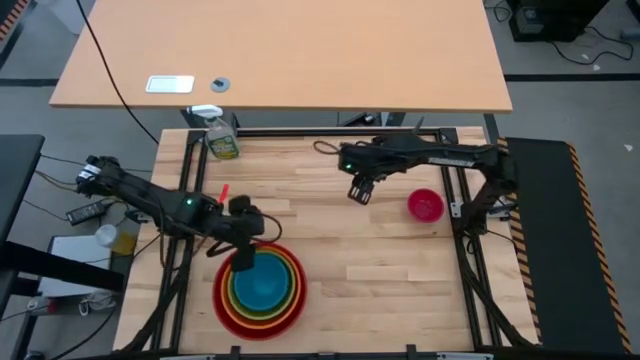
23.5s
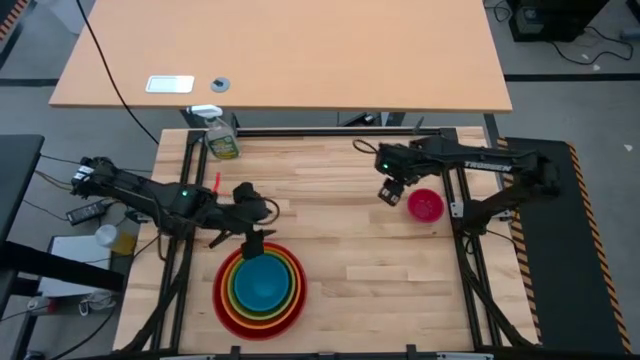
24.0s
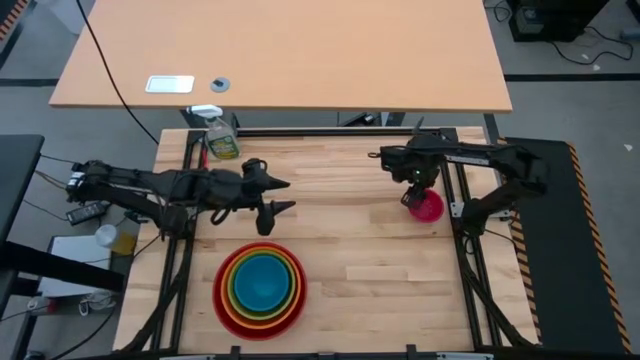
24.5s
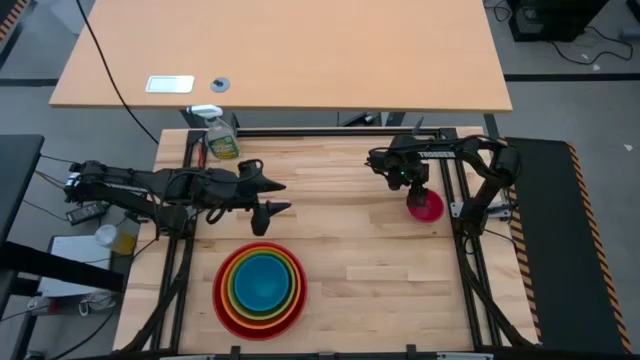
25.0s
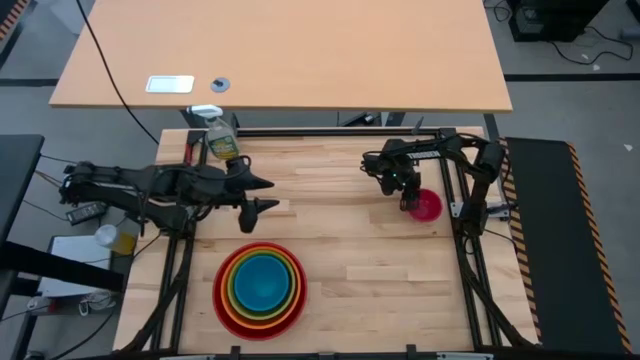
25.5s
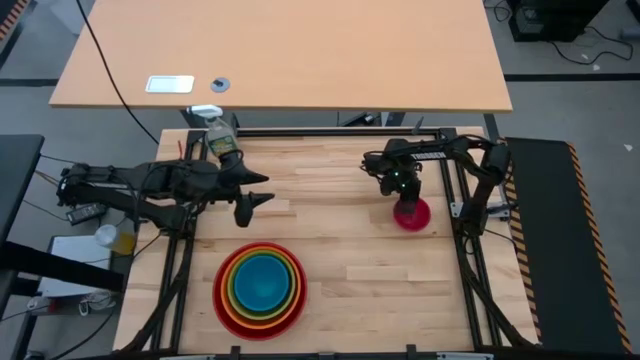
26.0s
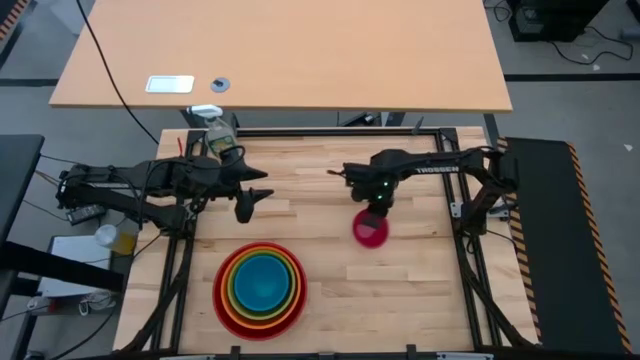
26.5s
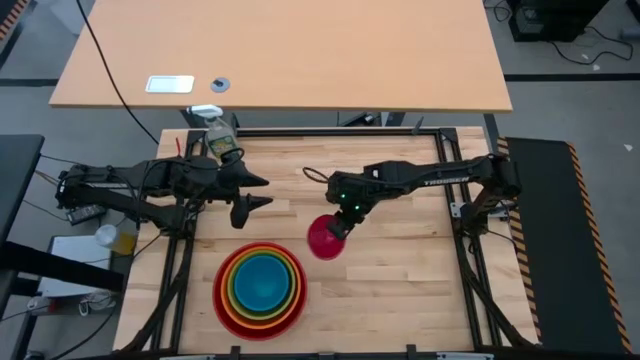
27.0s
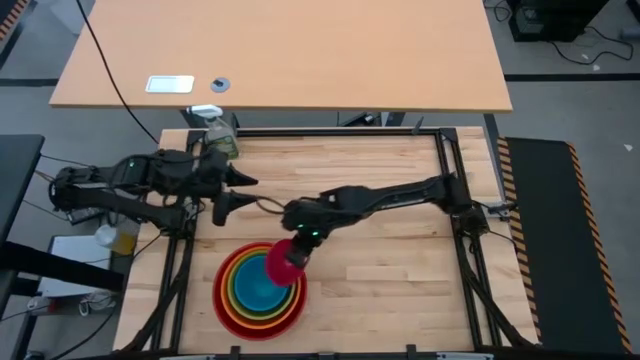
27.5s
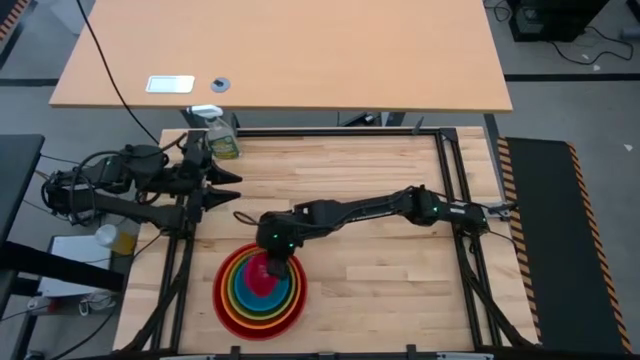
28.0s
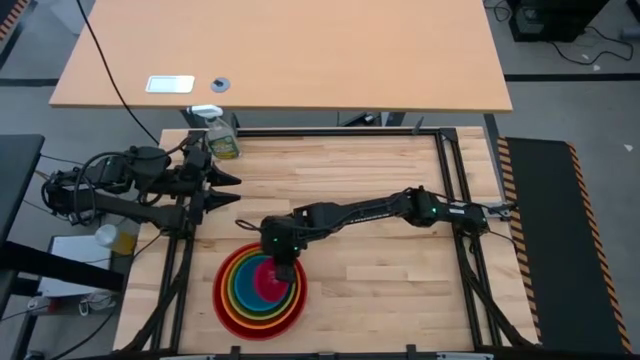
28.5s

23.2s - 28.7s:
Stack the pink bowl on top of the blue bowl

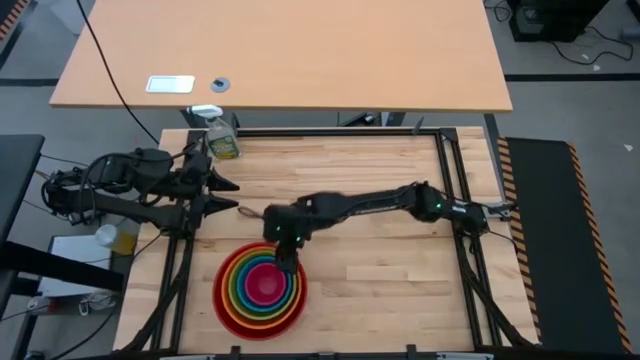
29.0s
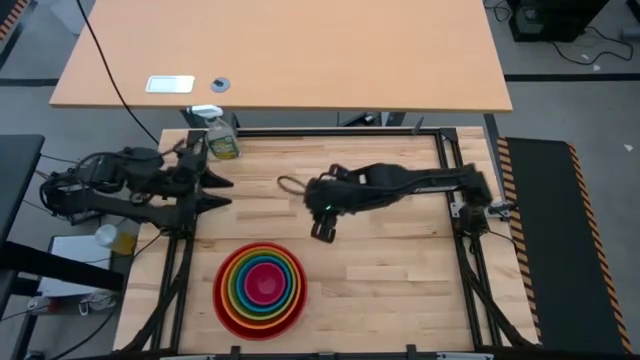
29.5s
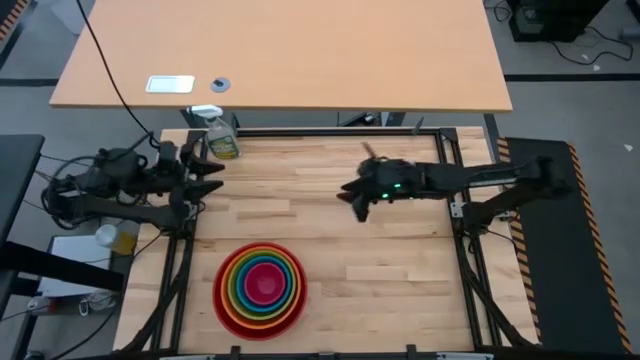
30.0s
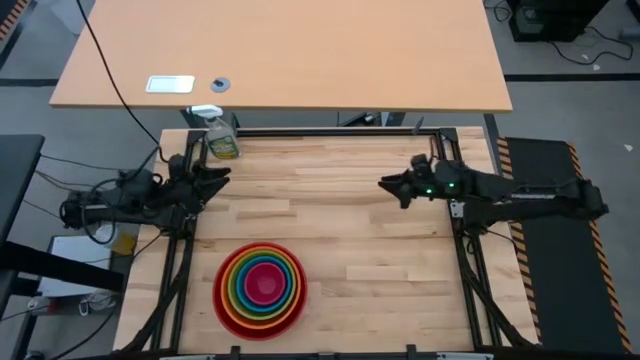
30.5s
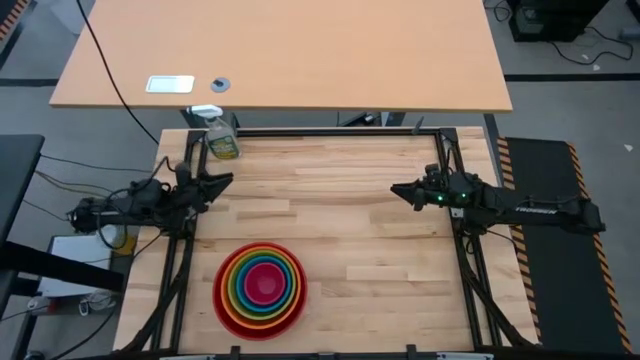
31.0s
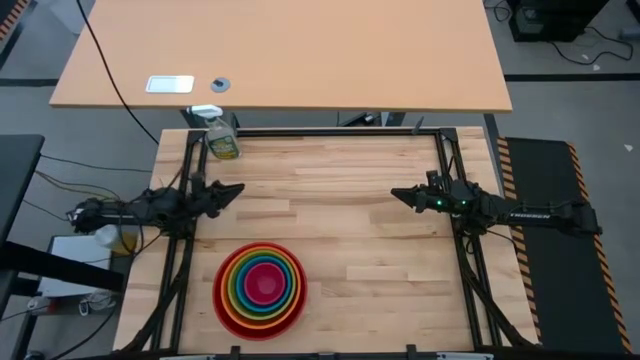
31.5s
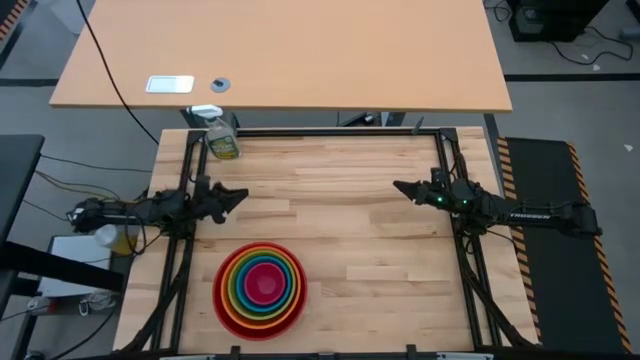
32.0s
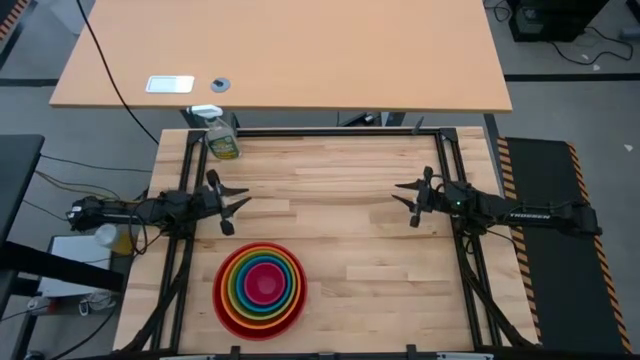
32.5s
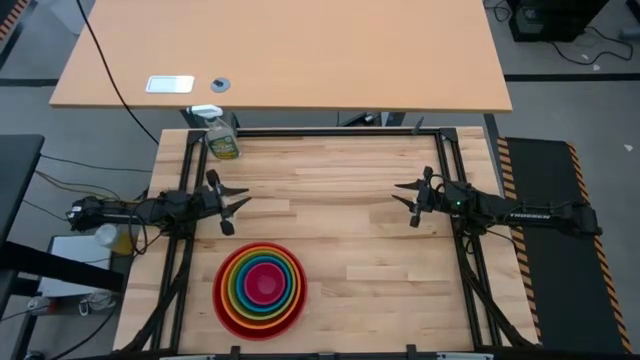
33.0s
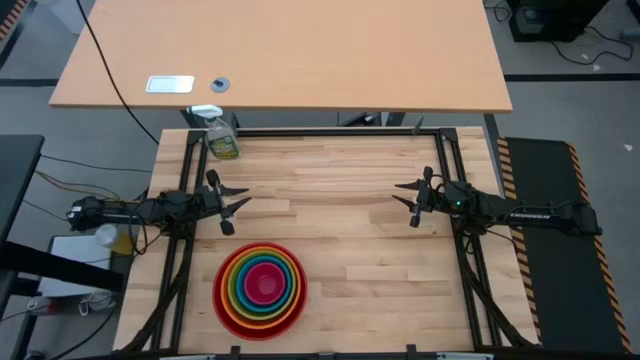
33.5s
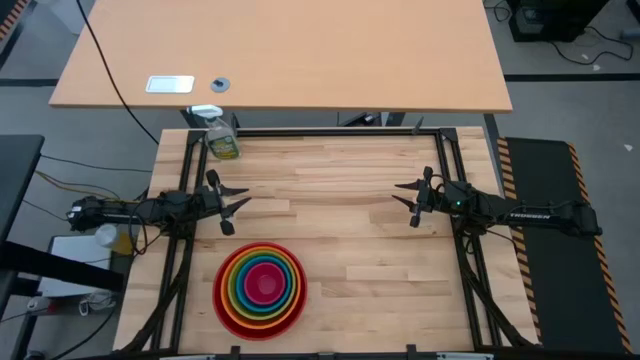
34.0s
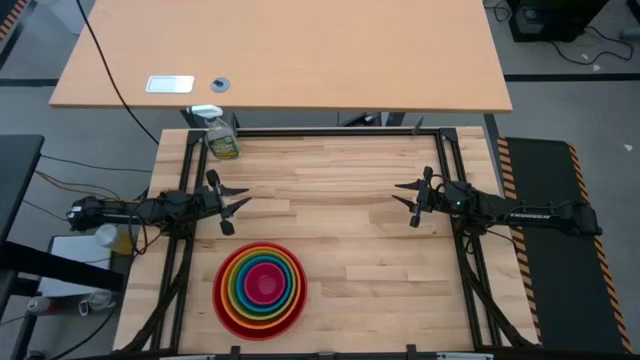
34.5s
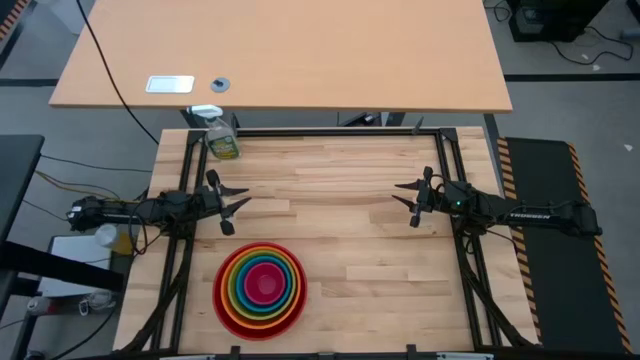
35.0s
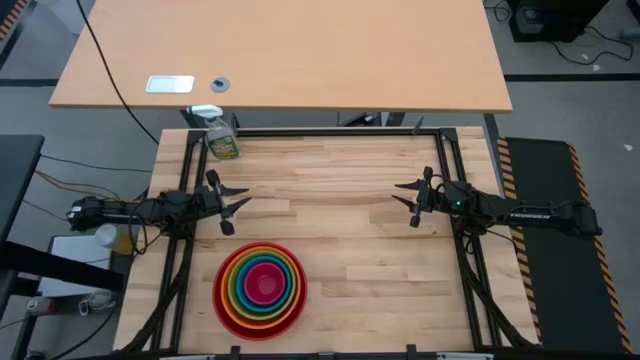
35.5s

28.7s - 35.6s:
Return to Home Position

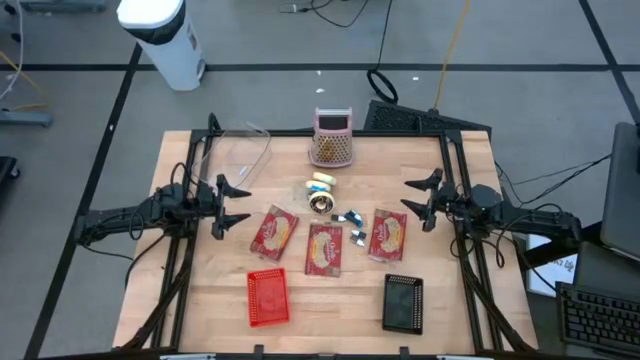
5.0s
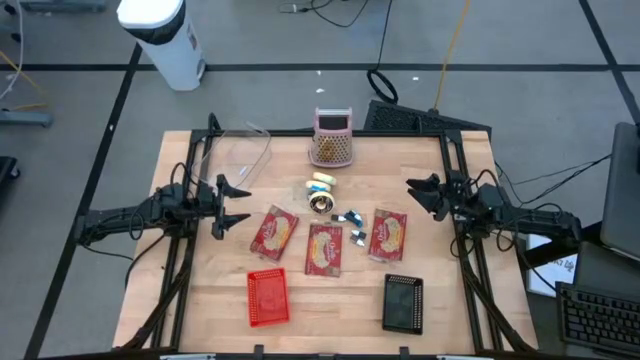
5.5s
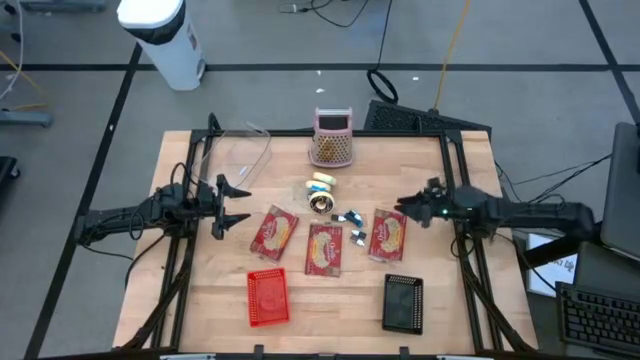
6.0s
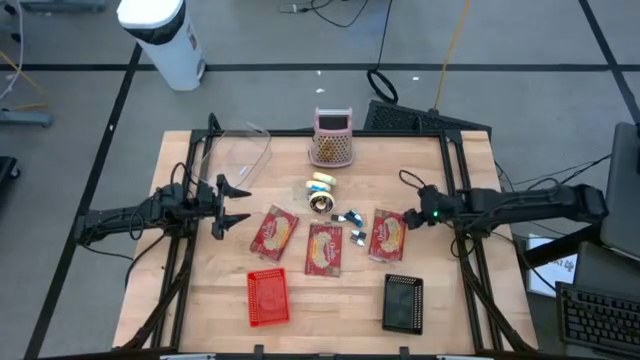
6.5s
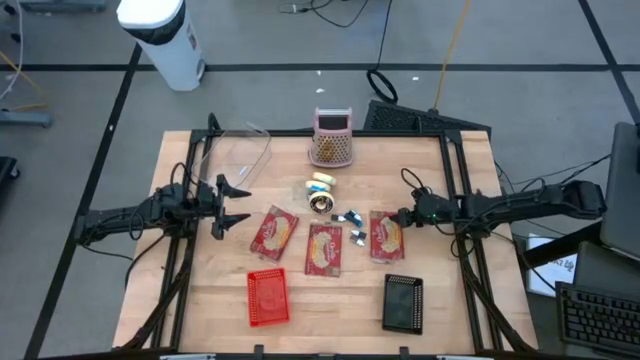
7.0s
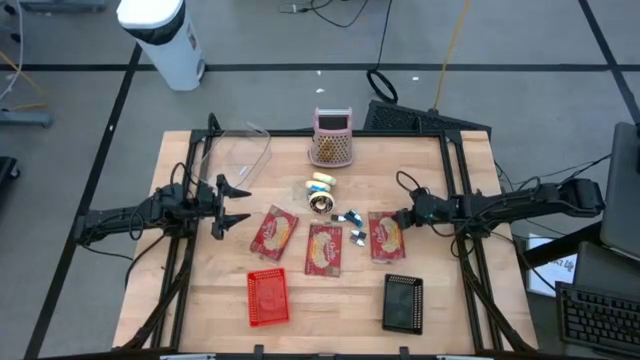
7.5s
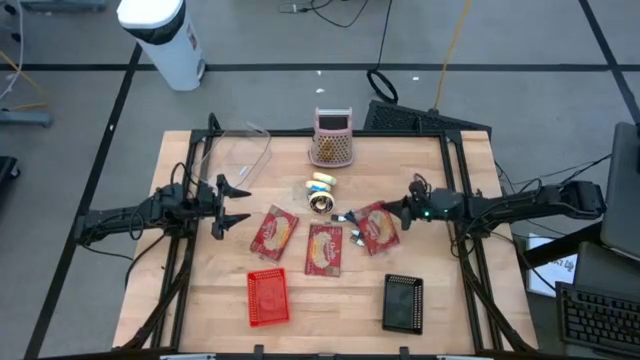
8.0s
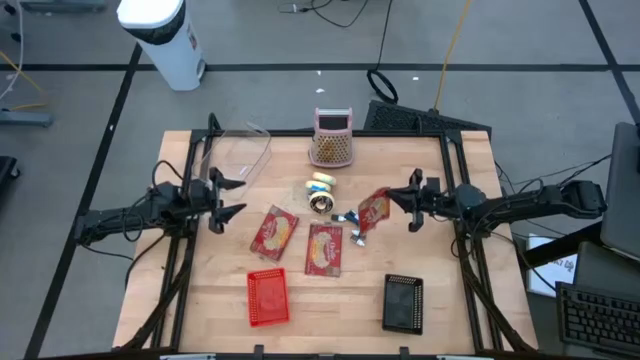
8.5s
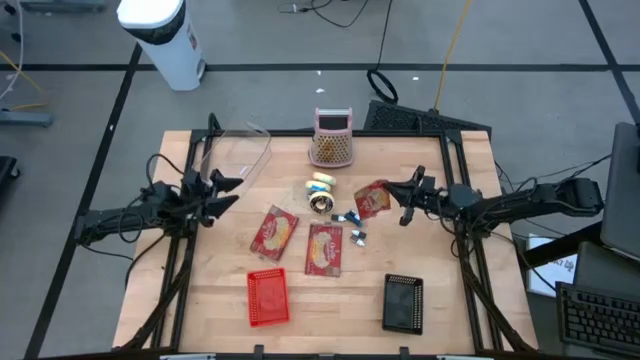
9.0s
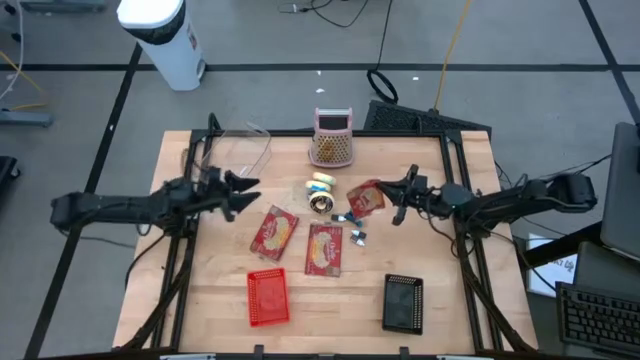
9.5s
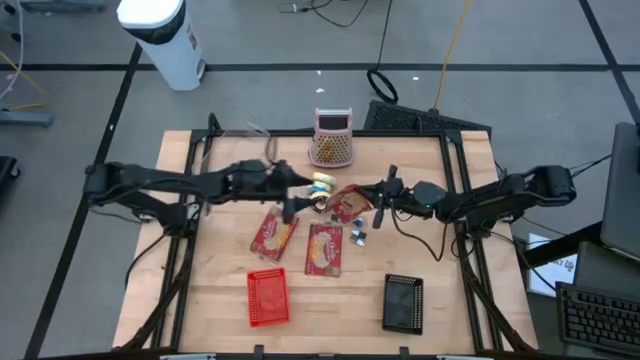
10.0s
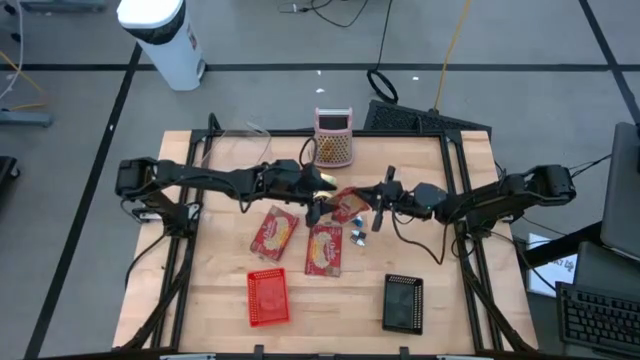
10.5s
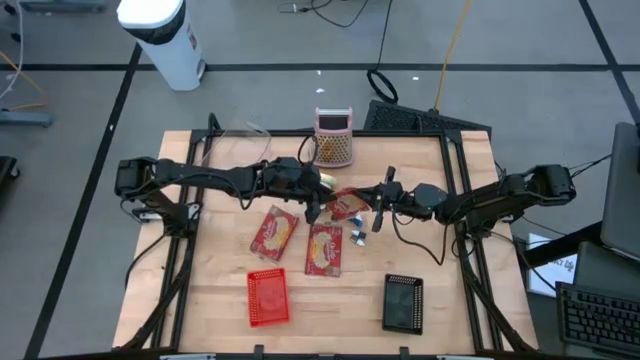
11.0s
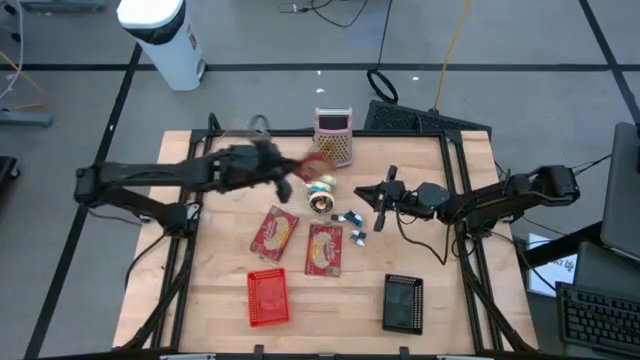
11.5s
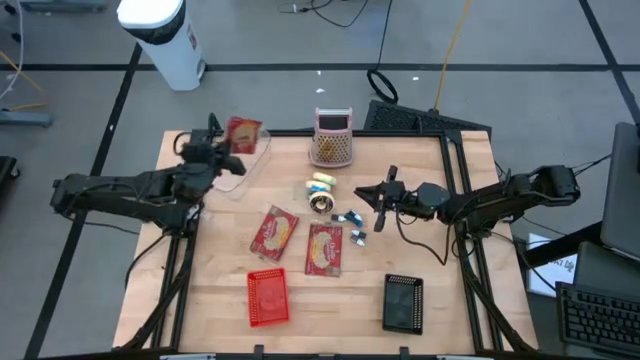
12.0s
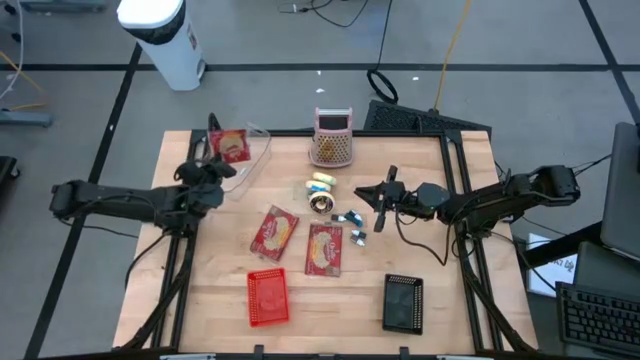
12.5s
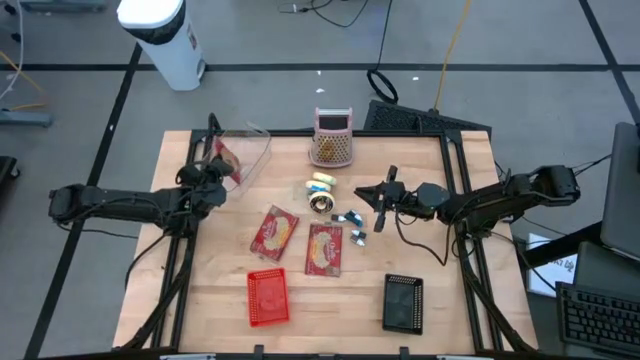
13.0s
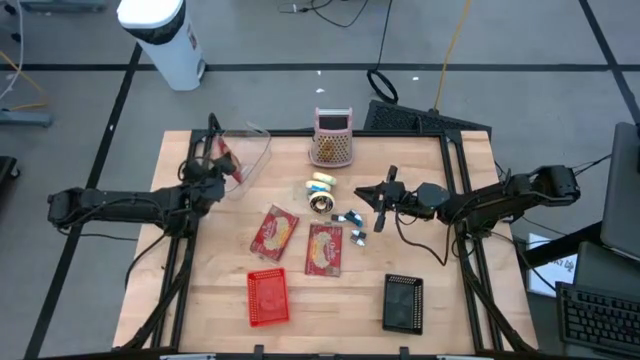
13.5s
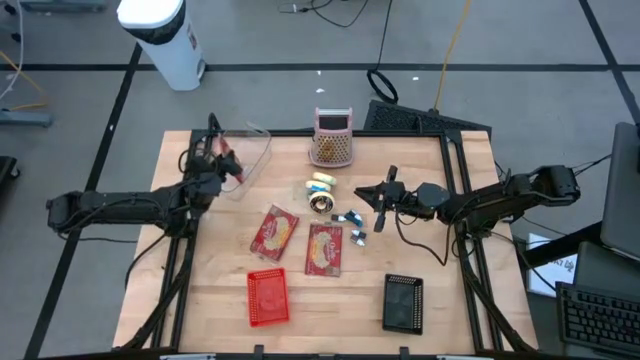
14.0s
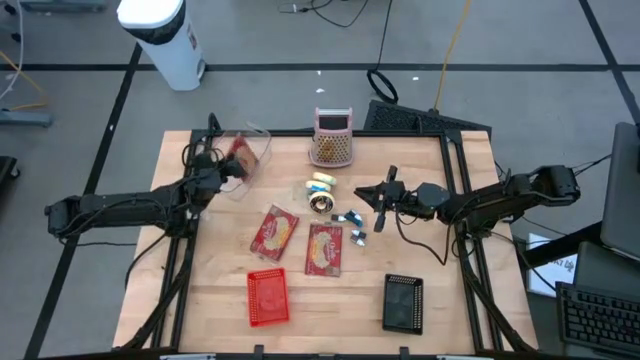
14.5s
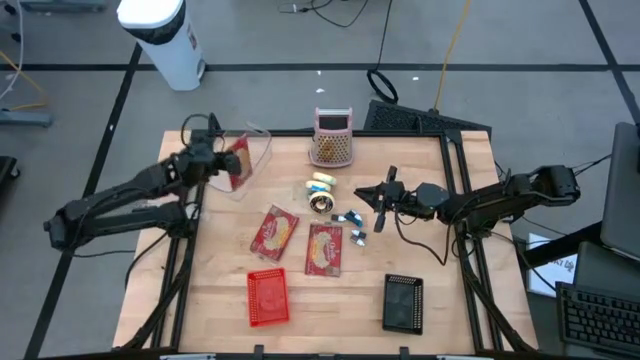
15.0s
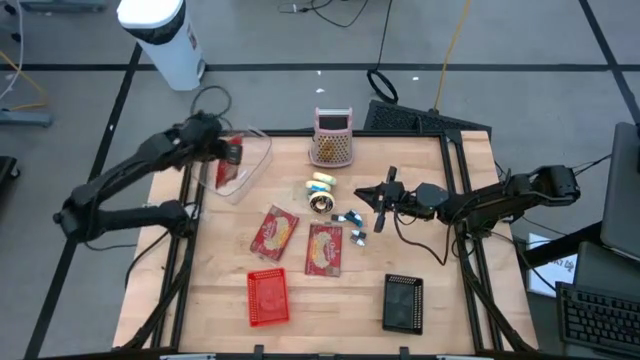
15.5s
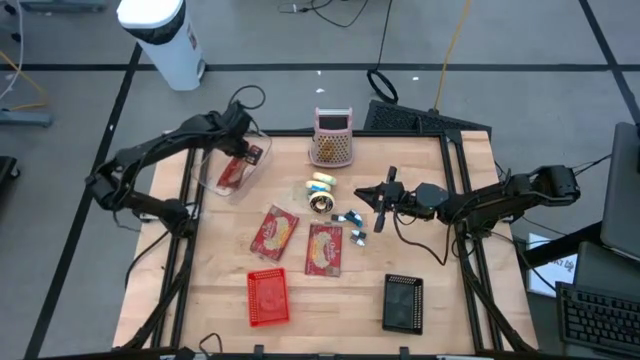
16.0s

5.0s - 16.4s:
Put the right red popcorn bag into the transparent bin
